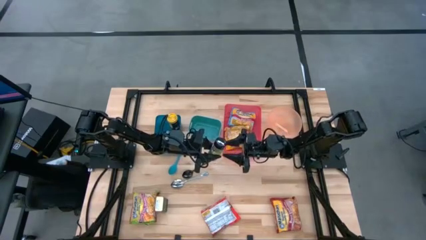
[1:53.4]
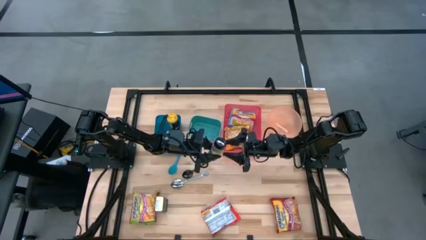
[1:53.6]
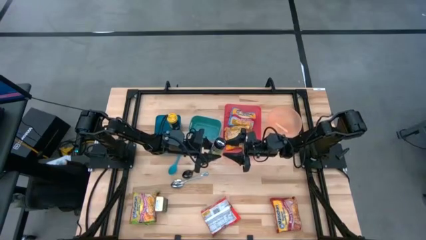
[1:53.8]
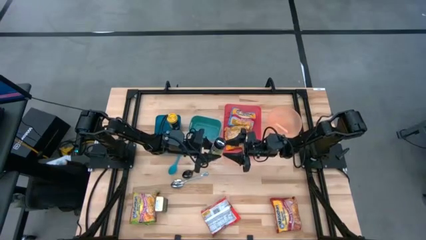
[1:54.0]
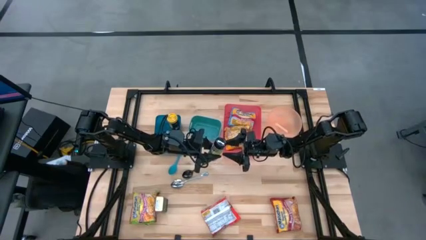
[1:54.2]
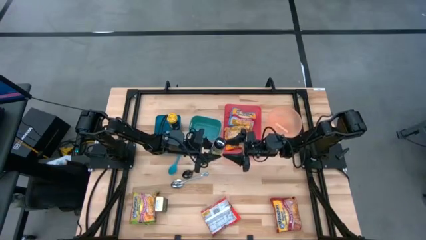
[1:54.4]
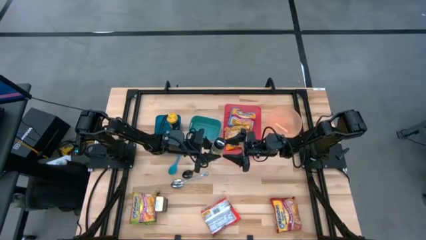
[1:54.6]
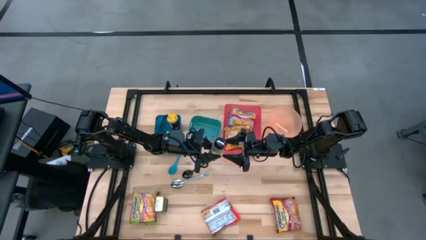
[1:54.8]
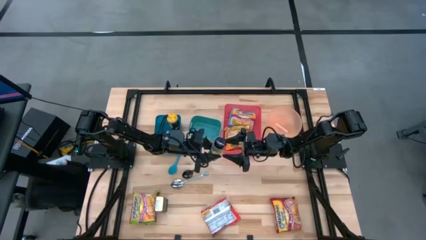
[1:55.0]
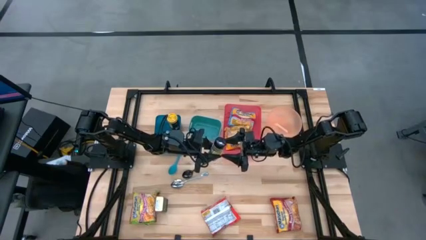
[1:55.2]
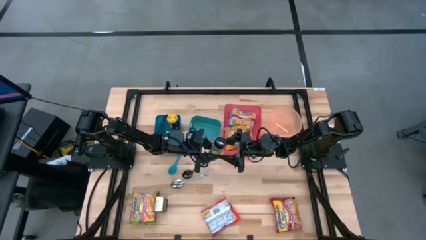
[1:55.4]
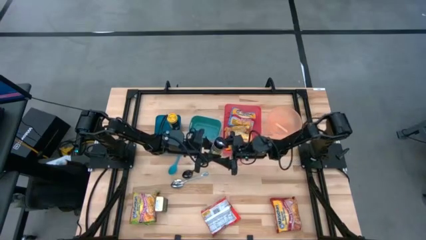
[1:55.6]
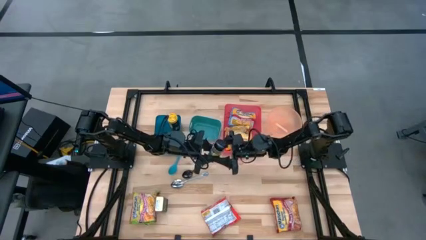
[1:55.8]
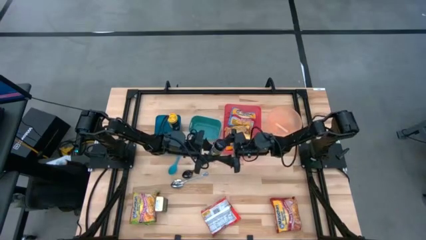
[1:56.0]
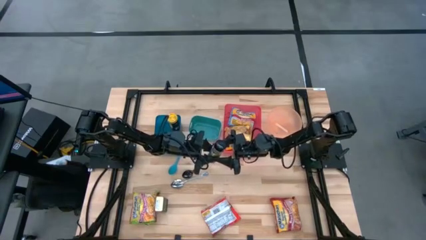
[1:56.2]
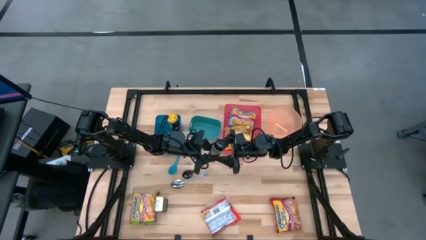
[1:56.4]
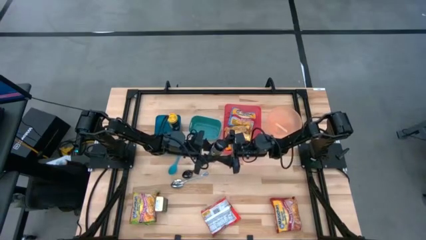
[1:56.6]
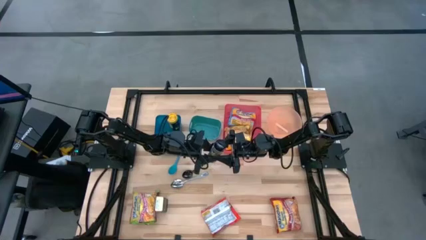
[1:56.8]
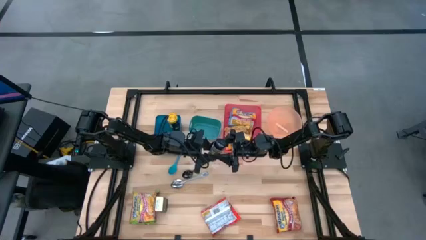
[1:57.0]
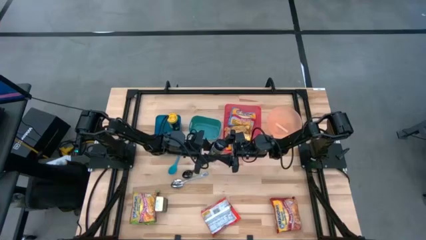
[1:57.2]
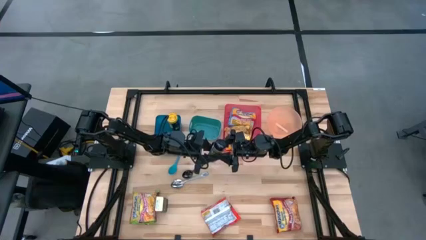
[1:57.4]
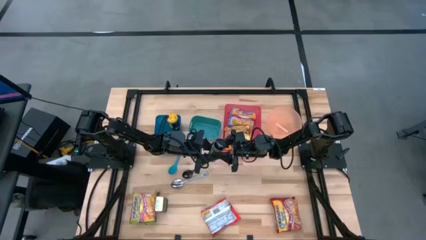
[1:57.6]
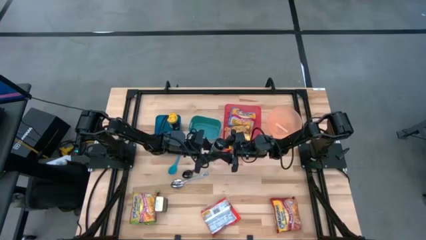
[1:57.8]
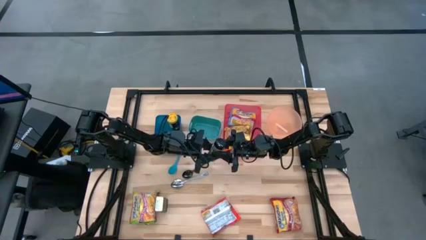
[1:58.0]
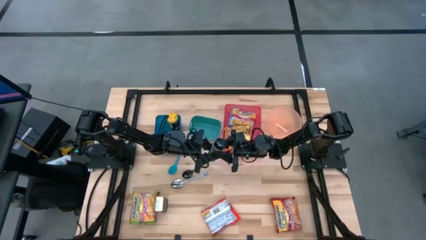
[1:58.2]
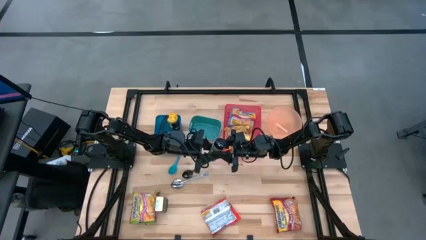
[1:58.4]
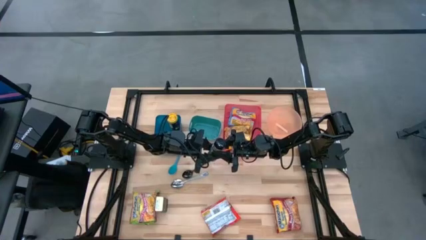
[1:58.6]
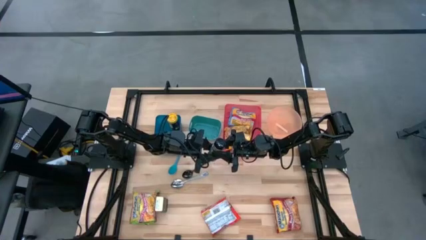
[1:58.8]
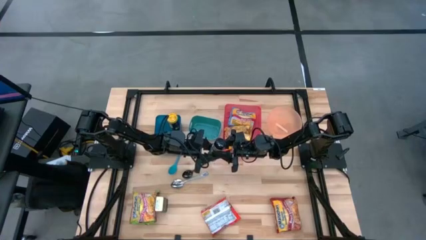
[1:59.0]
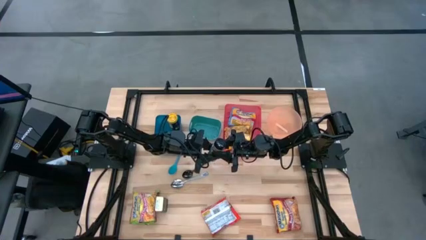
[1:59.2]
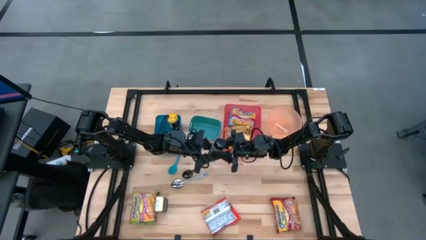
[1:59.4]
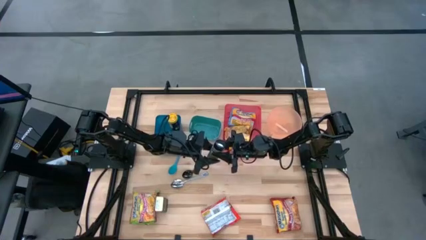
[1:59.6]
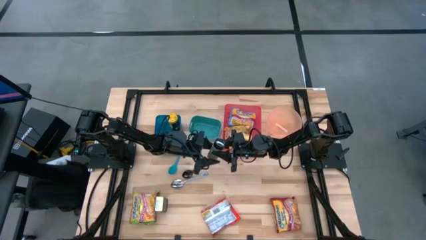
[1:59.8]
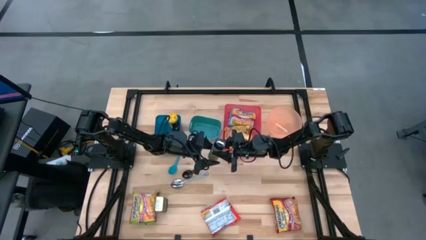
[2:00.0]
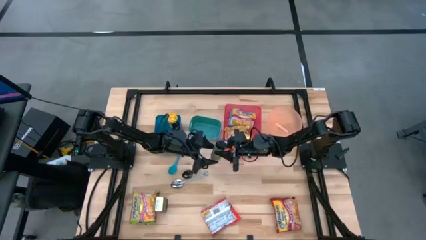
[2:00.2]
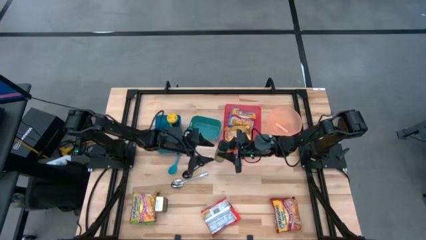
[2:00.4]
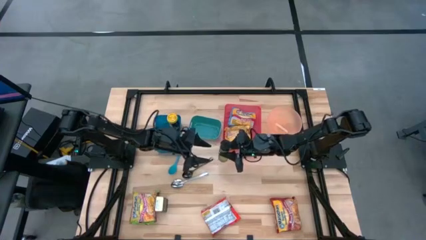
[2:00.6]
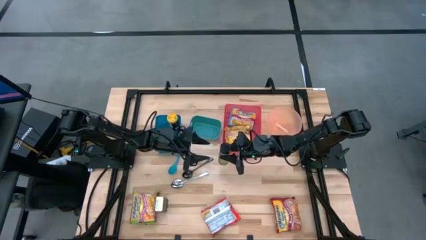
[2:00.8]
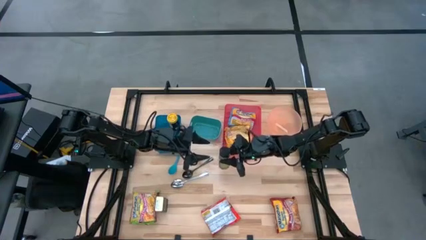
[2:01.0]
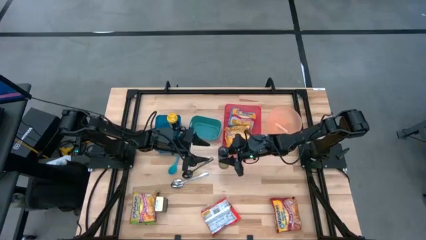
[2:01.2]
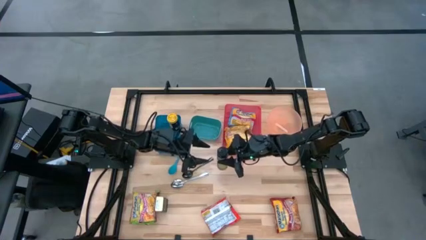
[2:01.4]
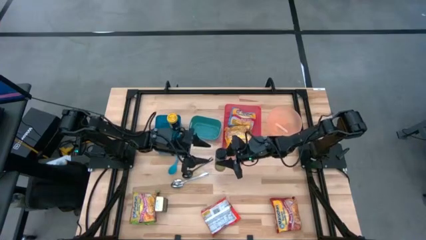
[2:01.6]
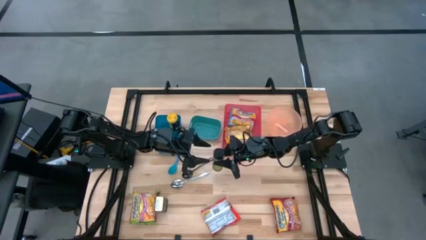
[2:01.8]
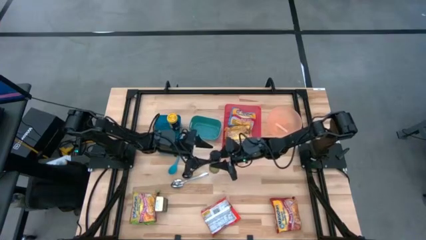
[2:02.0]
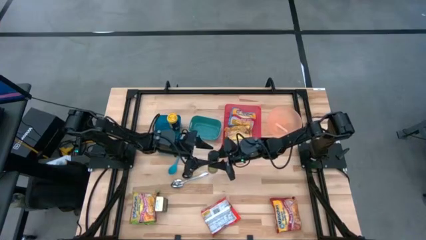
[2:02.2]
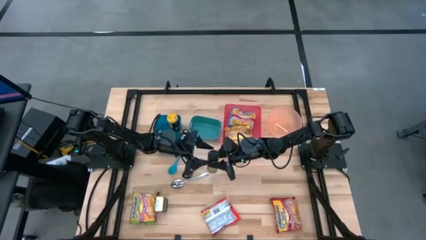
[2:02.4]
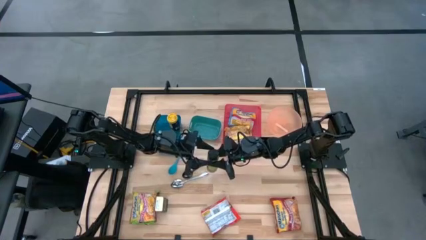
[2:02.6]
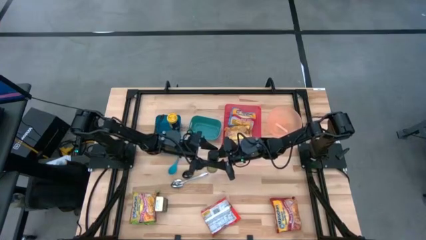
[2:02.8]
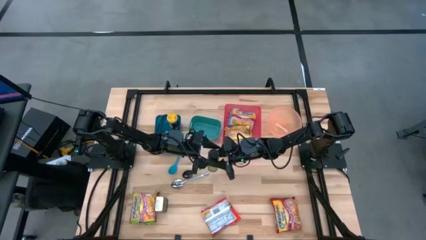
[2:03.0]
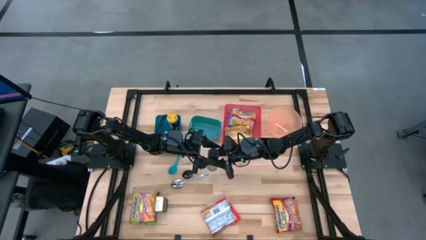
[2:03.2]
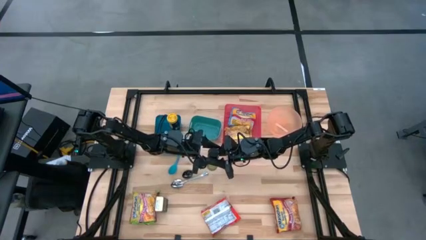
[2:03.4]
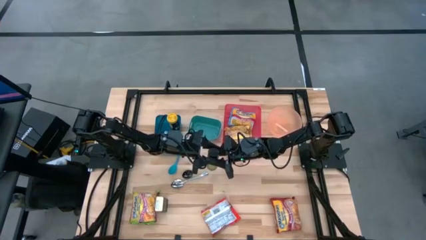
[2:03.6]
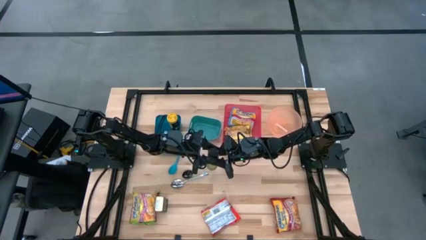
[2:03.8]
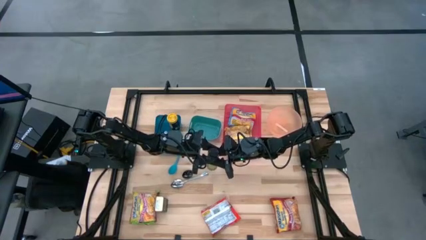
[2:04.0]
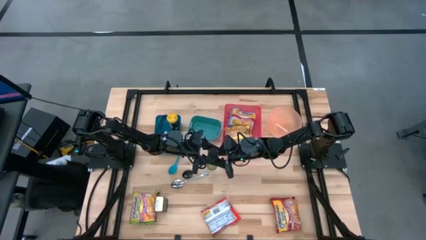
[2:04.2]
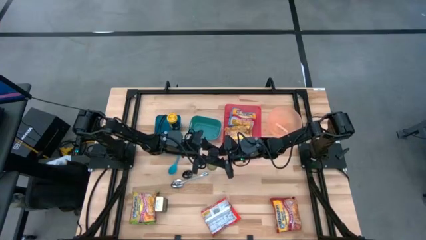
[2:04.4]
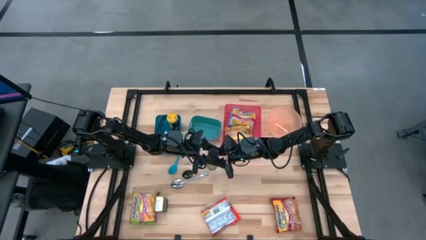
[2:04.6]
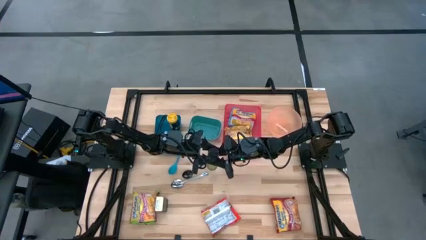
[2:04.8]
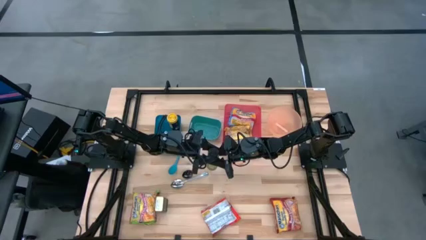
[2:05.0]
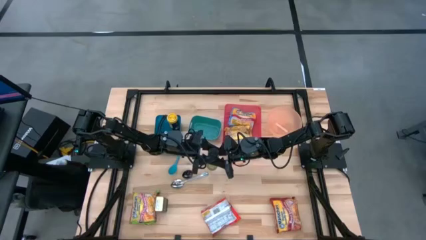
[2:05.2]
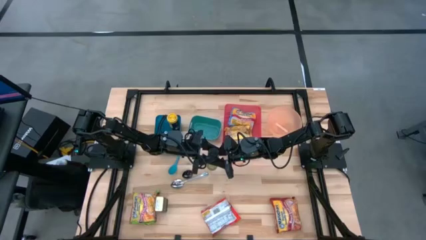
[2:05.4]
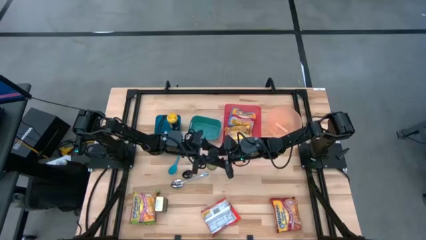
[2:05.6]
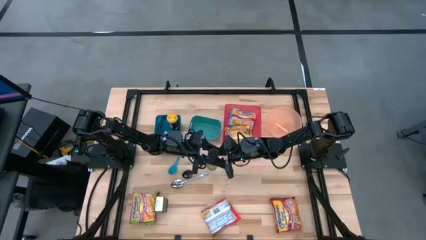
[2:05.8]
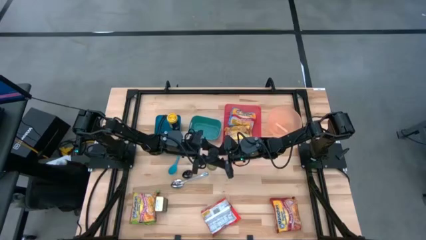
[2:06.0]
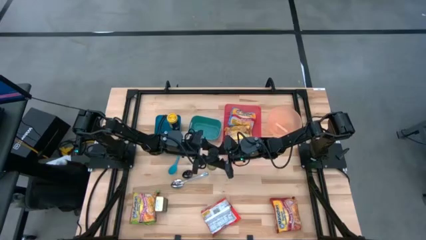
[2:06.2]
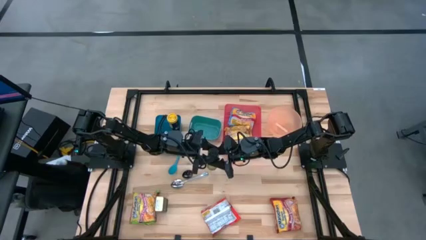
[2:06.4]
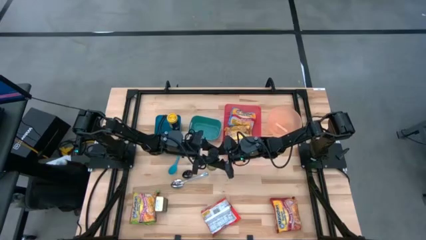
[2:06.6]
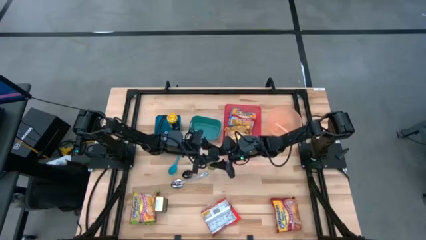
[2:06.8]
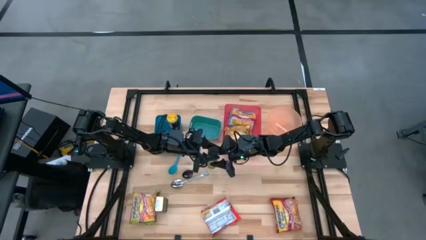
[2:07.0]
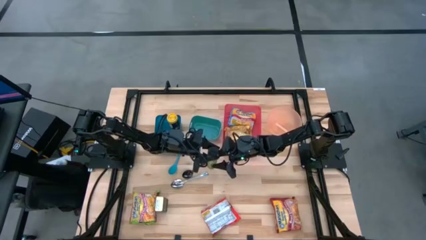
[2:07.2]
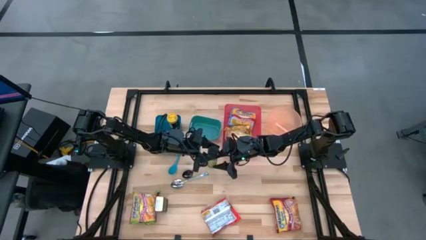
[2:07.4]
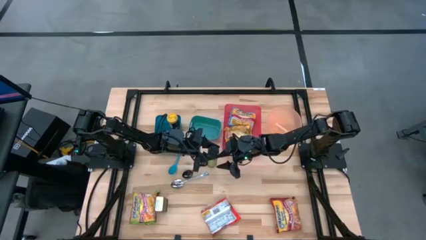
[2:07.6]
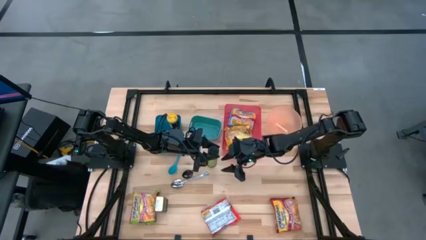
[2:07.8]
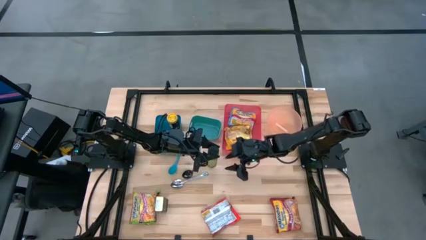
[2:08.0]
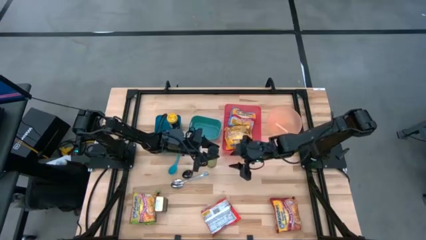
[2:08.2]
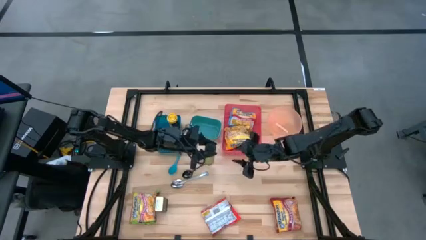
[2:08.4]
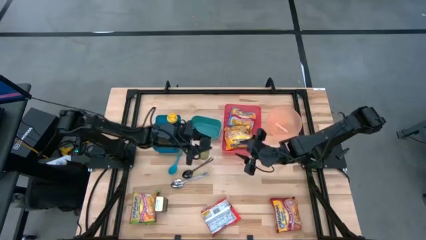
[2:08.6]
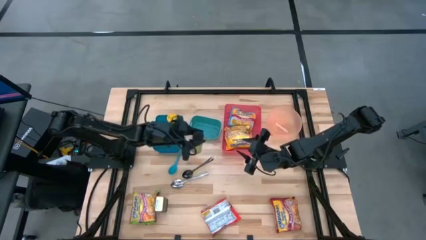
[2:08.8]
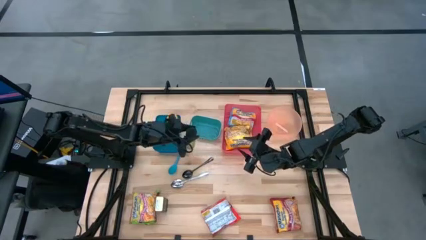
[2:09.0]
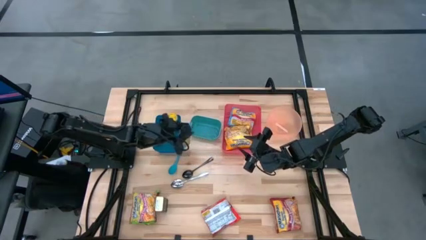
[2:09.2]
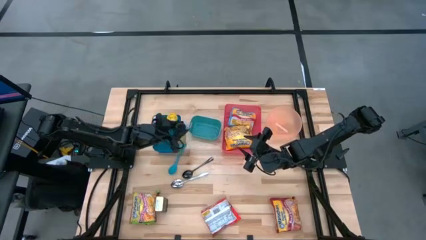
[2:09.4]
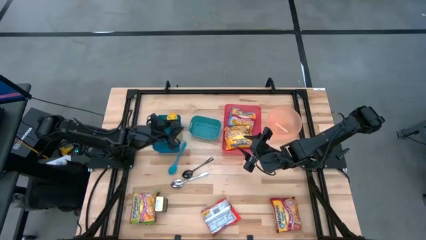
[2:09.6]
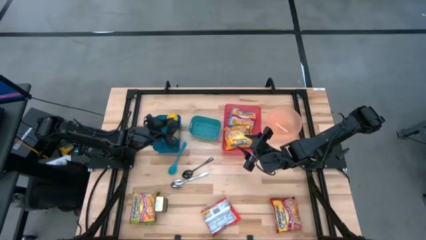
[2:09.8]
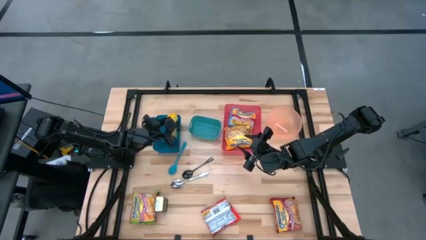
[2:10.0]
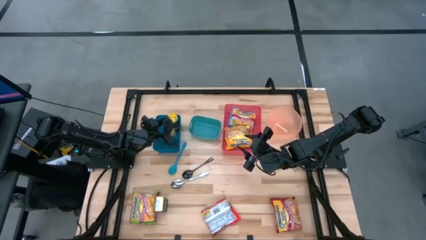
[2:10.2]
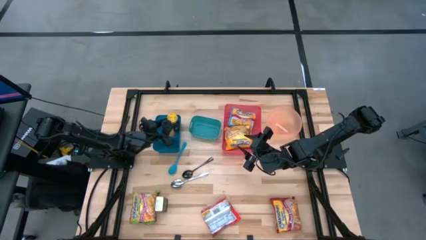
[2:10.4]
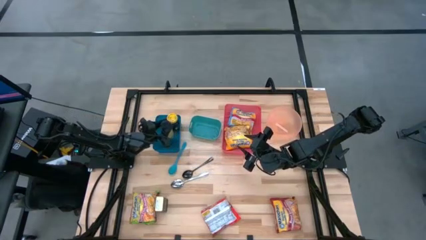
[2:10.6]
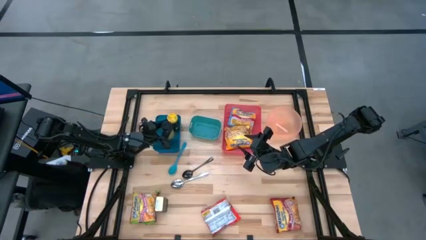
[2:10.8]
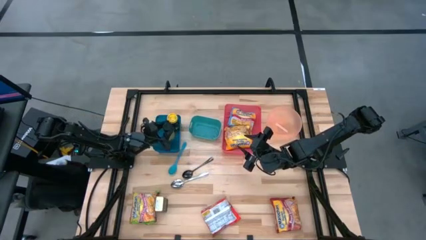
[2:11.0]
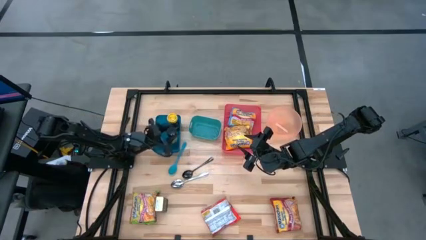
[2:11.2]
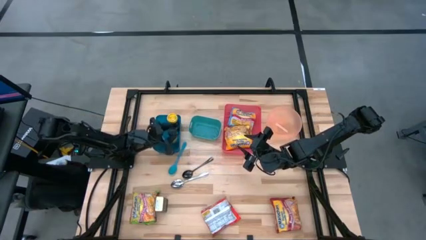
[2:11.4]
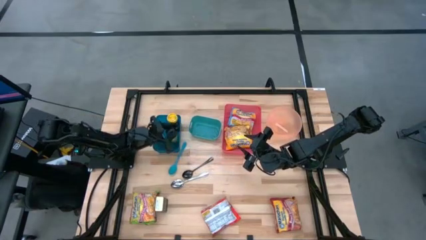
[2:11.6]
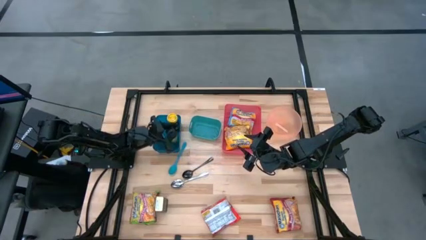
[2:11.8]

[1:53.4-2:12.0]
Task: Pick & Place Food Item
Put the green seasoning bottle into the blue bin
